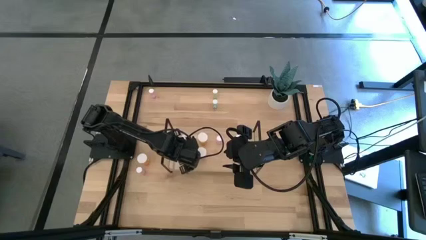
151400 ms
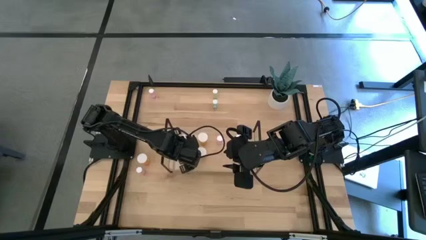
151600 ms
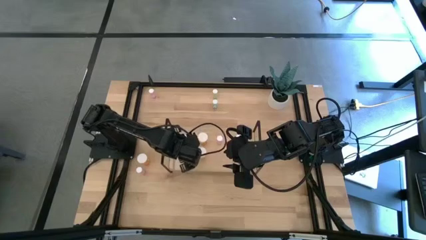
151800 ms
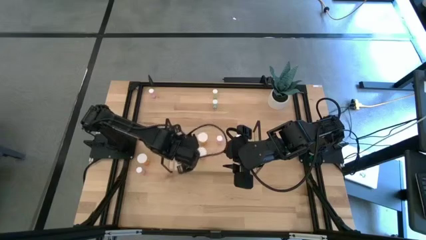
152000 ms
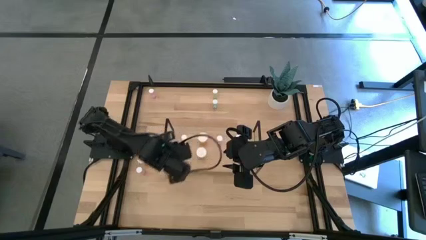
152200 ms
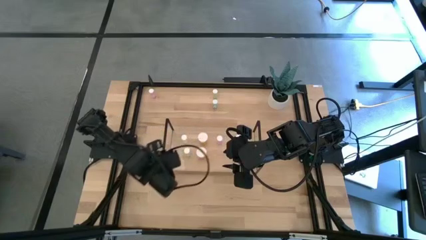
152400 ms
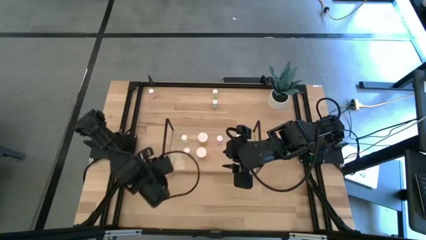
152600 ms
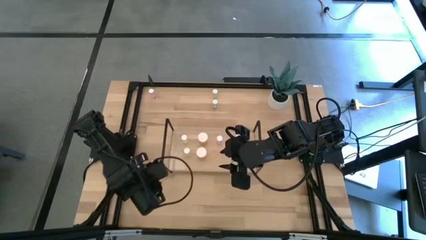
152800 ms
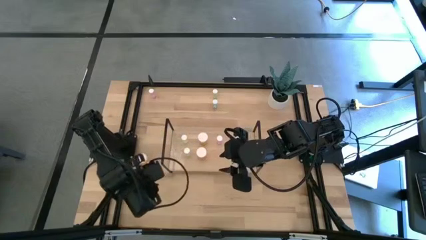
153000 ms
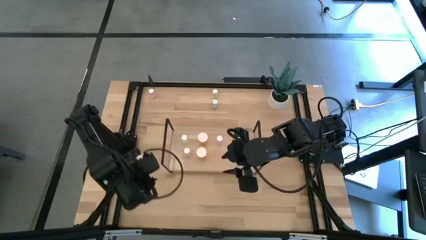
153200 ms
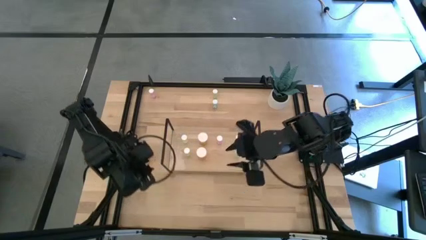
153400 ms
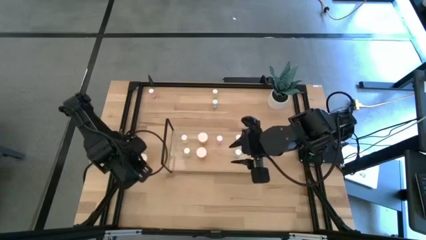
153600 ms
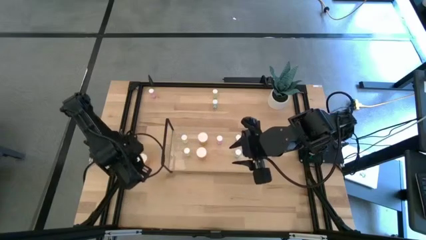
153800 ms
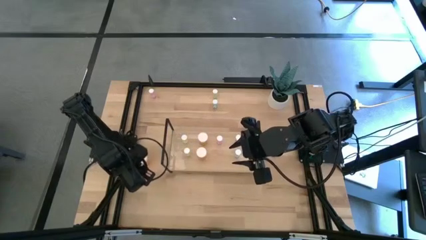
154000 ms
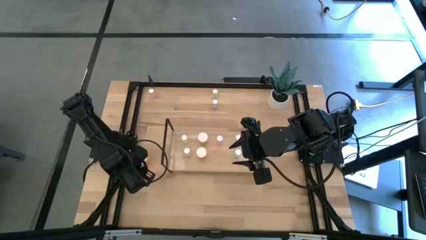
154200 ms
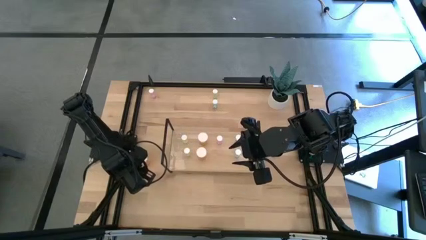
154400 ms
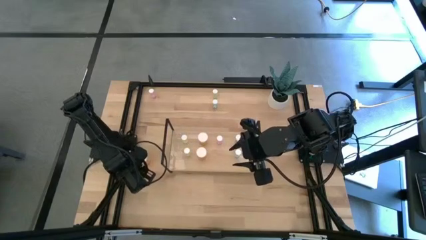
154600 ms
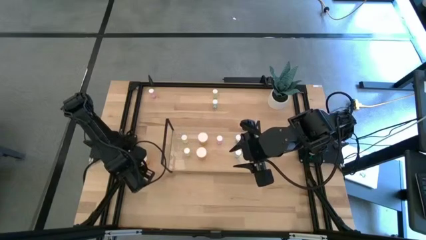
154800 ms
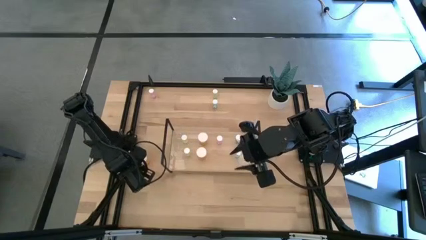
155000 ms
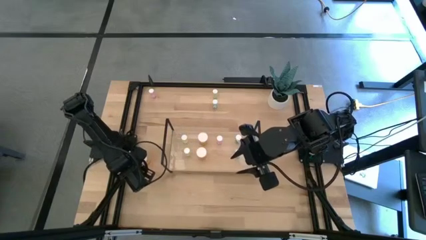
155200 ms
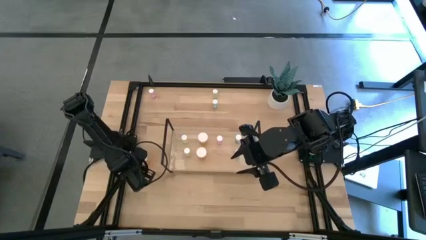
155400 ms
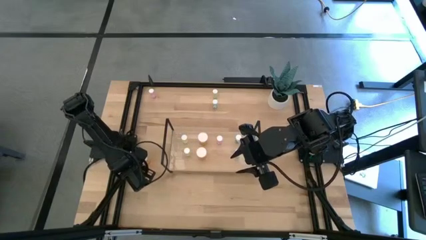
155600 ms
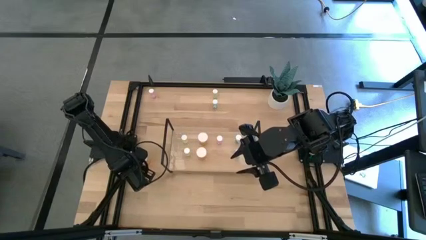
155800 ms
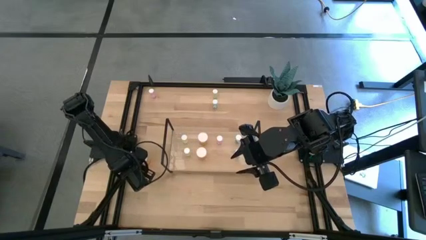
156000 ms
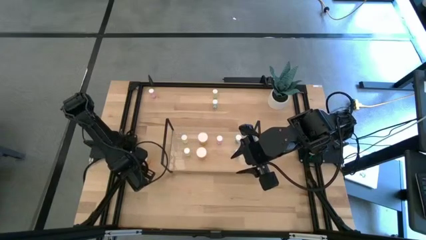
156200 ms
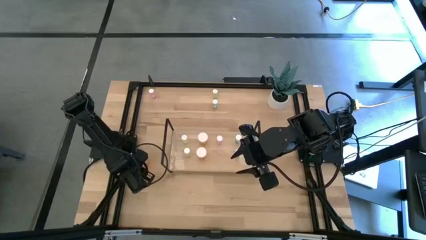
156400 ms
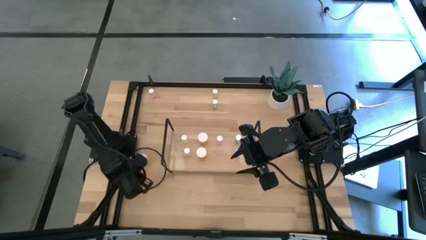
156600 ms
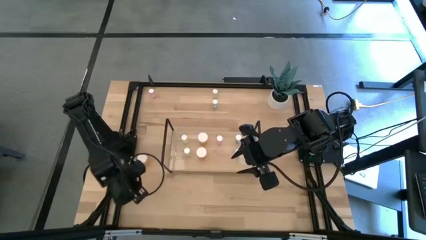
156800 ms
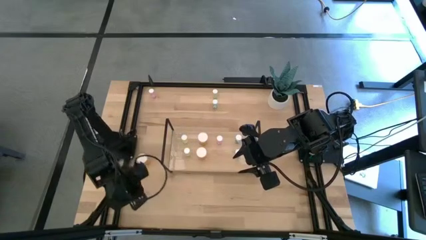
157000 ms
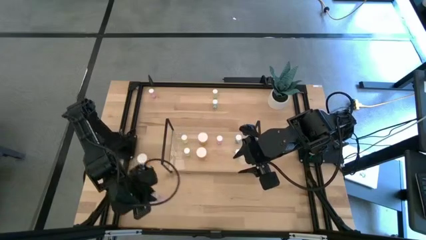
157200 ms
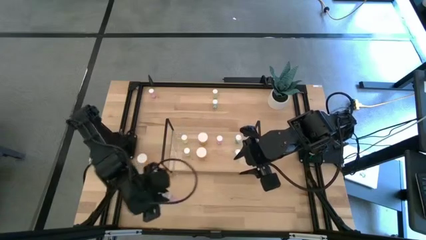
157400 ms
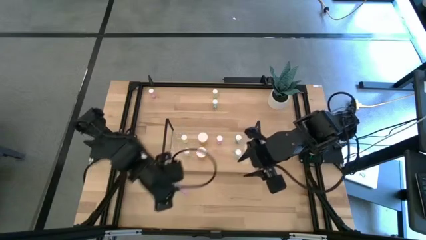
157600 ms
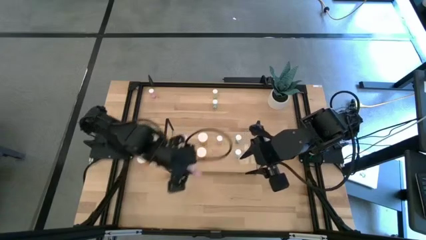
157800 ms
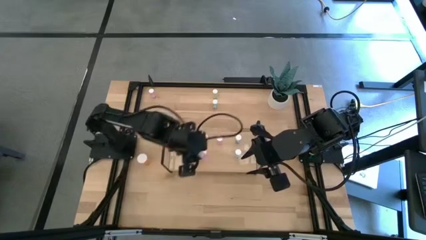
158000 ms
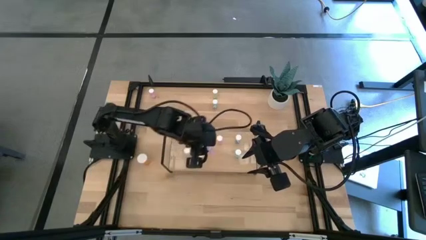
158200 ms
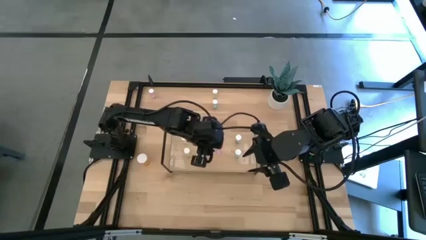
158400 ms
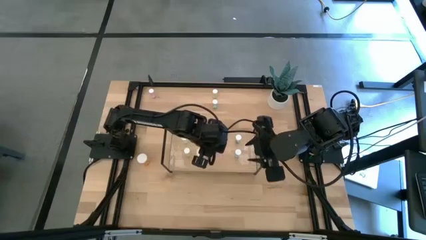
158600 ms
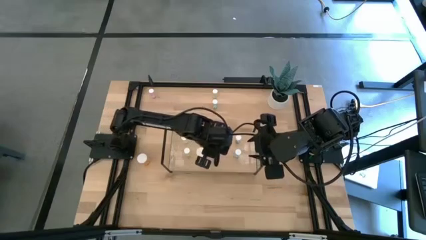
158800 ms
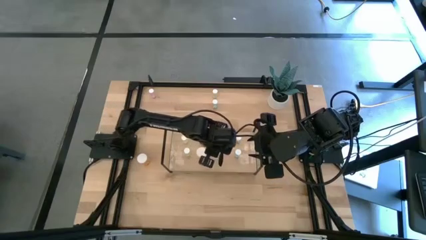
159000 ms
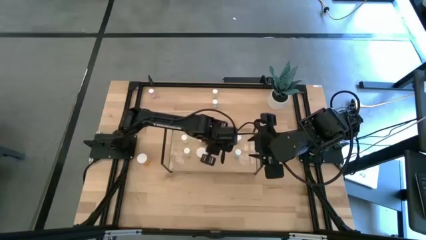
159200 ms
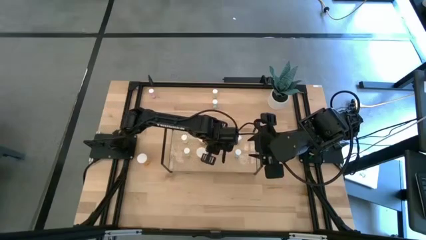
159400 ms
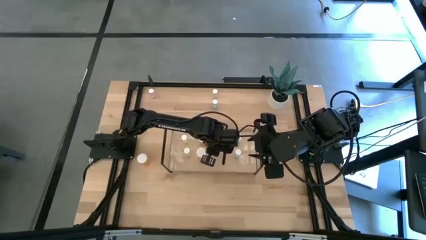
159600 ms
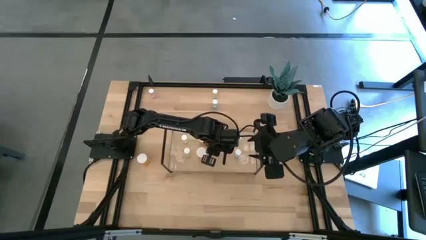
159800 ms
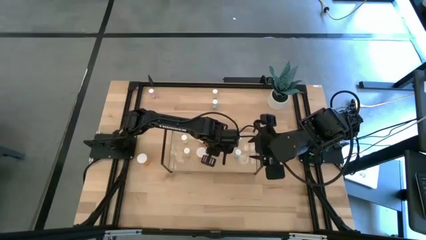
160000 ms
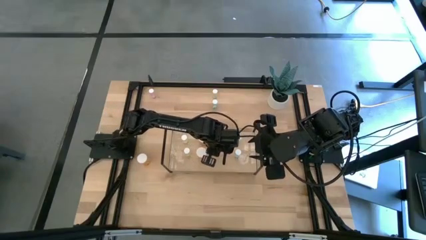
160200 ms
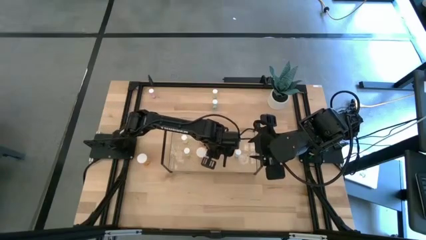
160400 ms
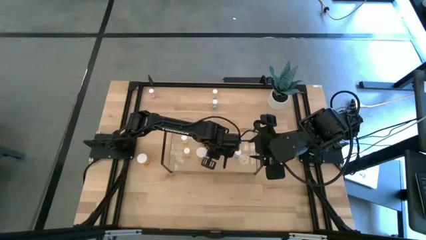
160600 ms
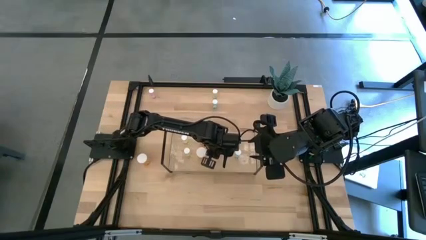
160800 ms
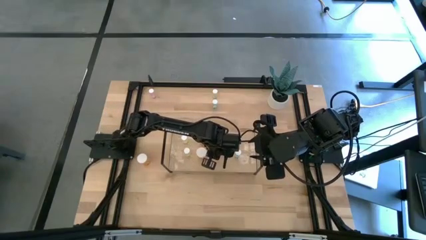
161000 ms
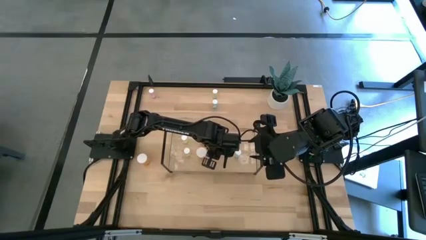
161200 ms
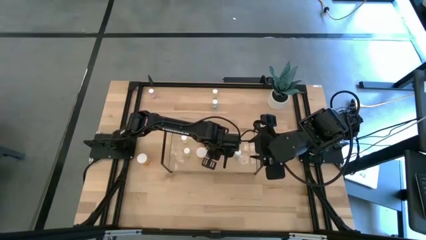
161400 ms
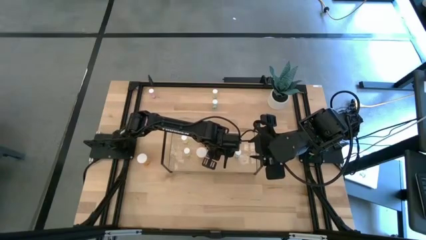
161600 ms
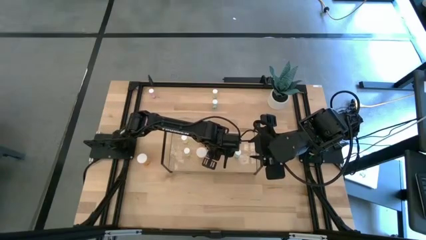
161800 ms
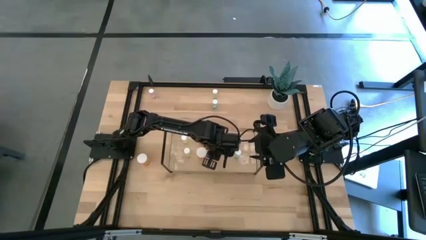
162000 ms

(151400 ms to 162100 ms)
Task: Pick and place medicine bottles onto shelf by color
Put the bottom left pink pill bottle aligned with the pink pill bottle on the shelf

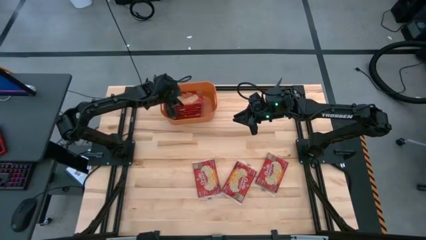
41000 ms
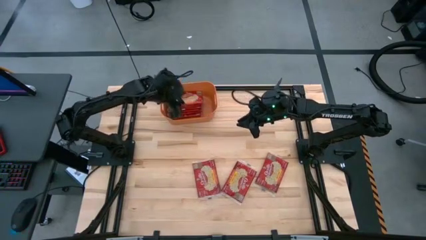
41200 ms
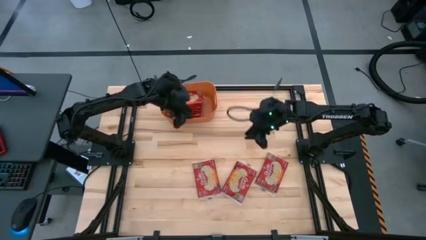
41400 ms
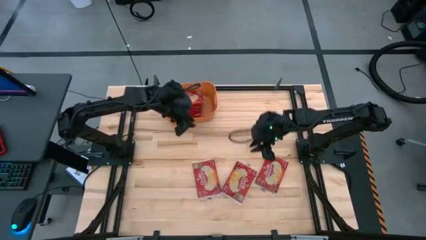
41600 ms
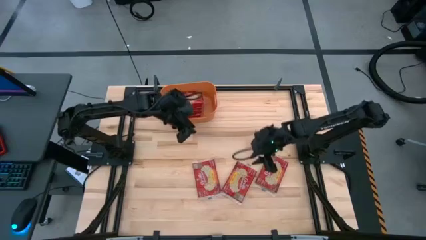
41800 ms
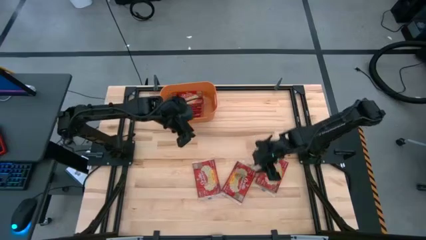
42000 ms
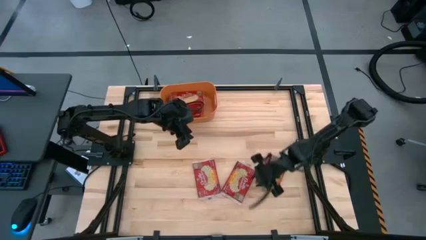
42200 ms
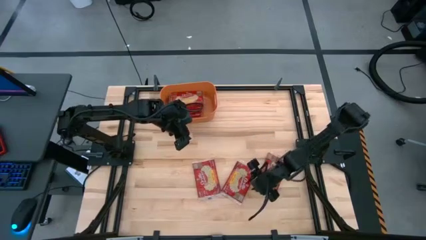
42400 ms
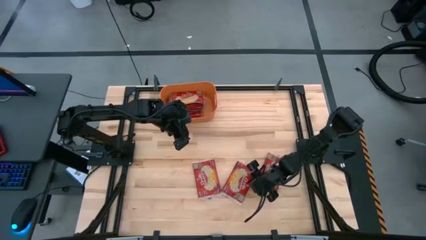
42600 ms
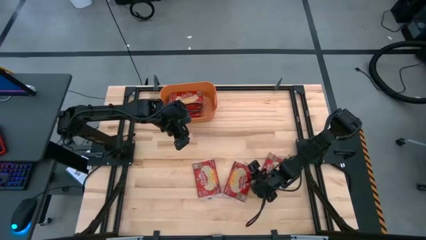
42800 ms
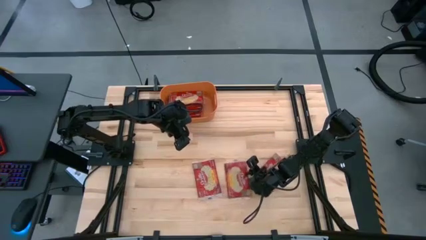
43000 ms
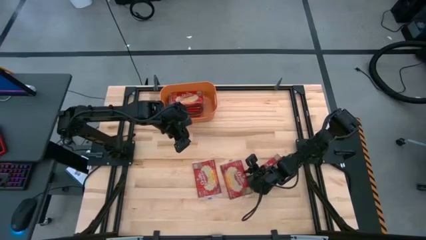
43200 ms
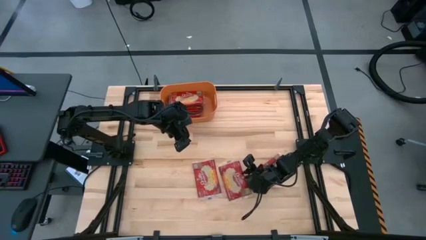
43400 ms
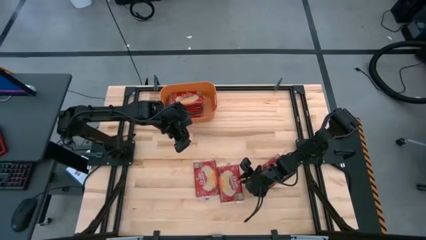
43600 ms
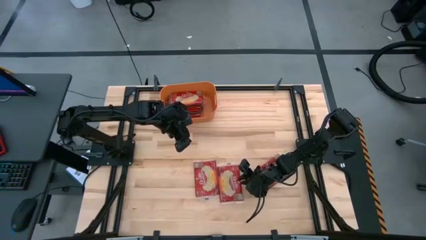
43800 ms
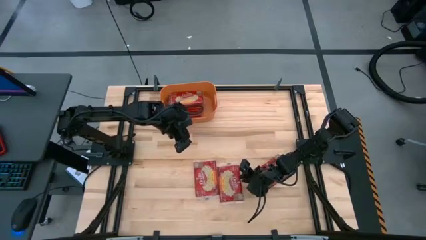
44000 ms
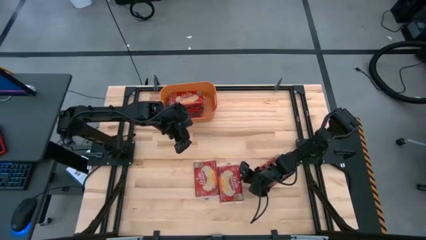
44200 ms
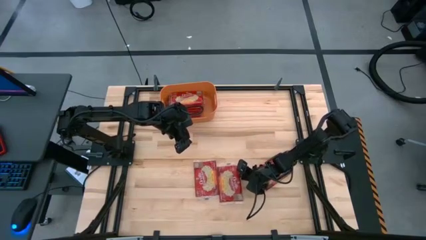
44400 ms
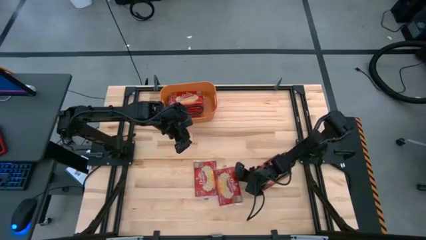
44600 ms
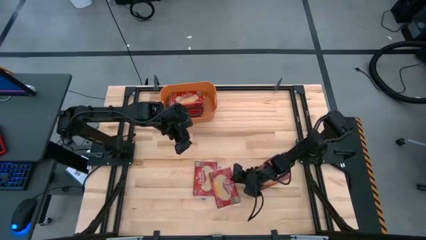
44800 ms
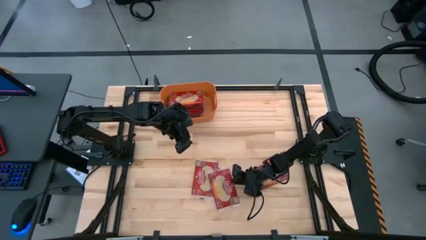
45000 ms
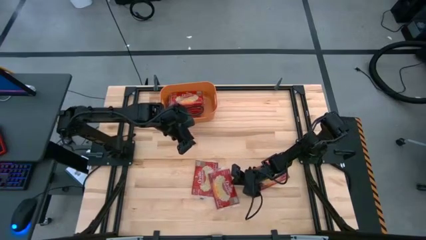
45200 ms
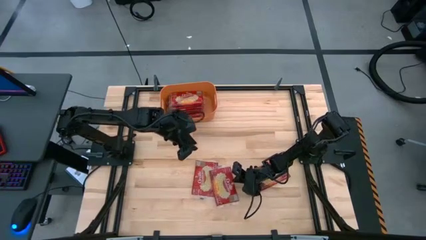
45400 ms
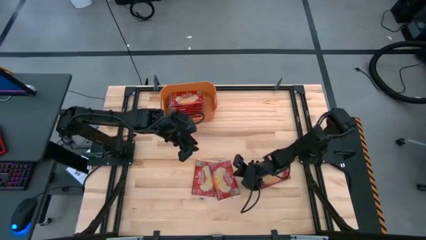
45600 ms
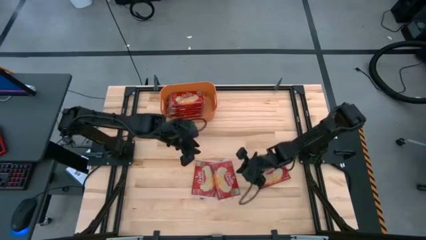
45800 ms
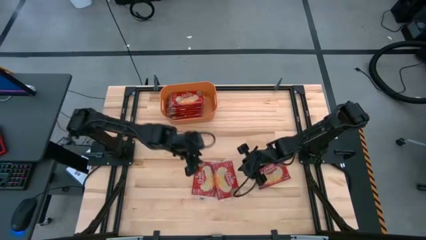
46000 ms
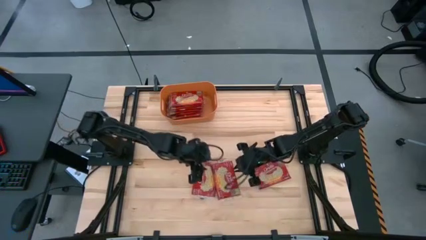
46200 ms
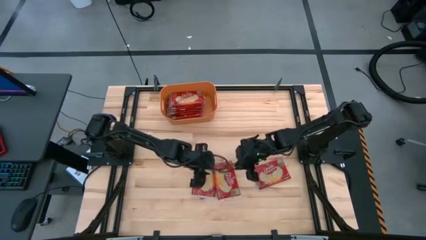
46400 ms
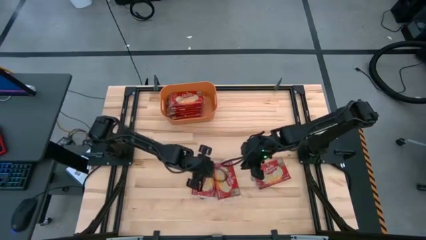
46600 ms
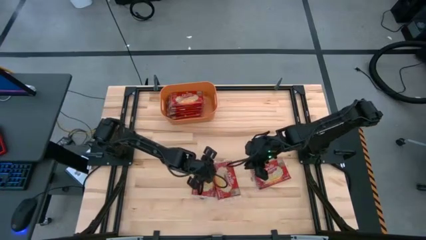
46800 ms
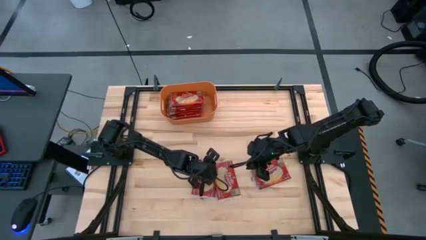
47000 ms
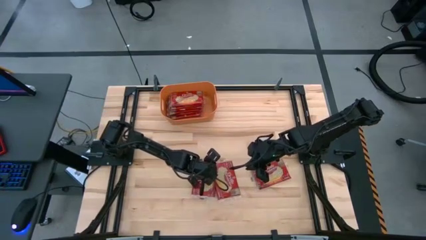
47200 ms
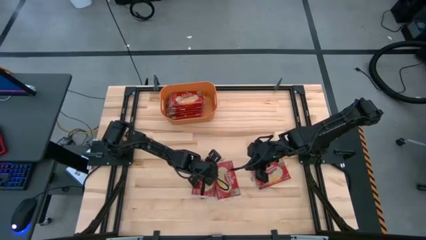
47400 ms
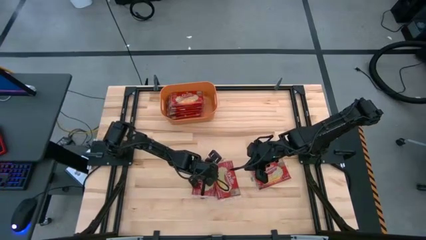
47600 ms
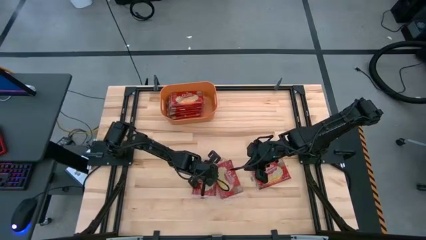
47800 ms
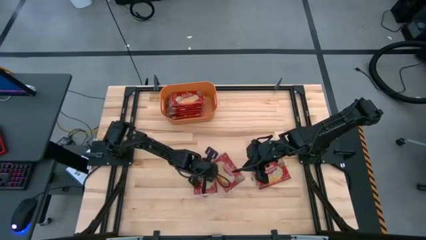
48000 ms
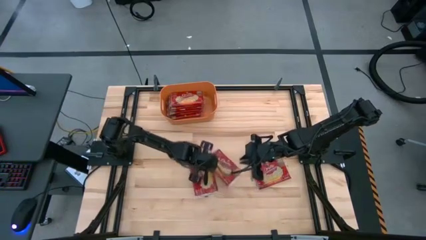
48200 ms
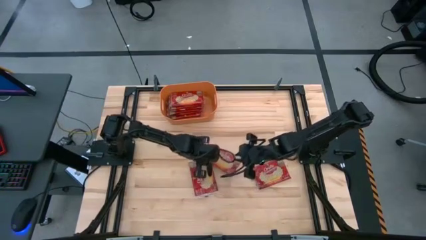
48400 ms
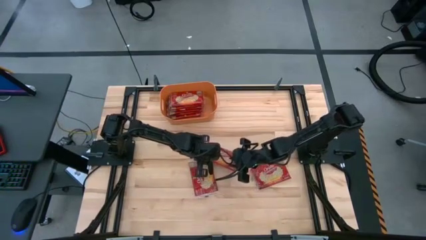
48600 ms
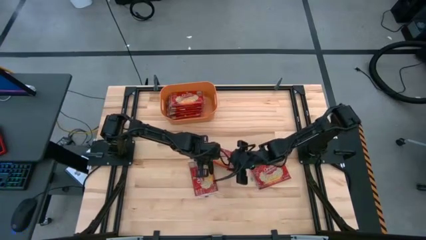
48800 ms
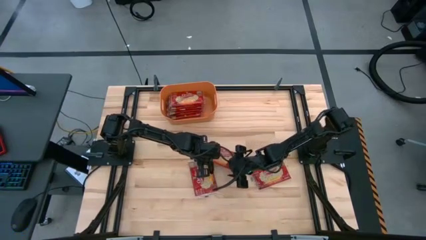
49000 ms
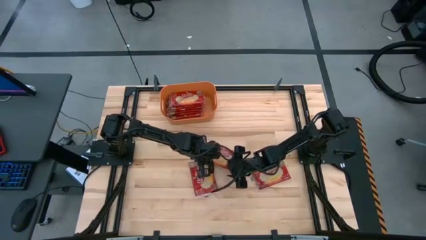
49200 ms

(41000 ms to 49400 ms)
Task: Sort popcorn bags into baskets
Put the red popcorn bag into the orange bin
